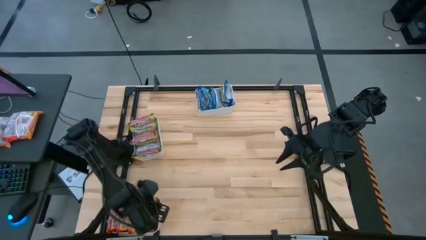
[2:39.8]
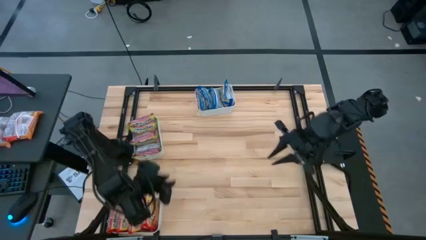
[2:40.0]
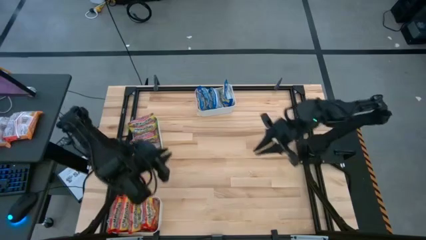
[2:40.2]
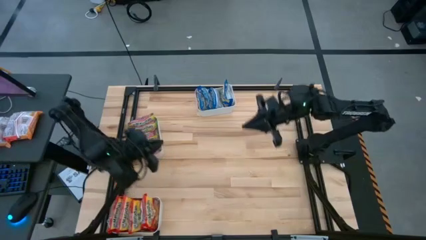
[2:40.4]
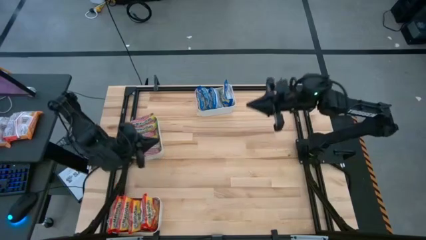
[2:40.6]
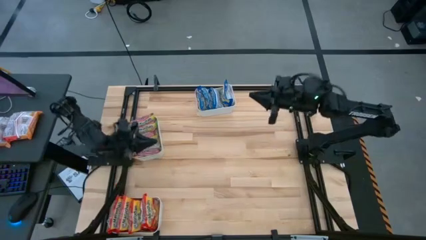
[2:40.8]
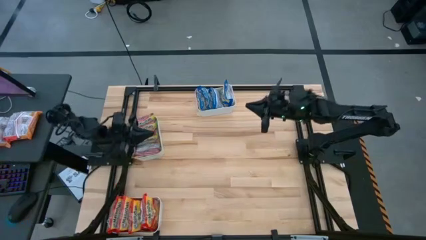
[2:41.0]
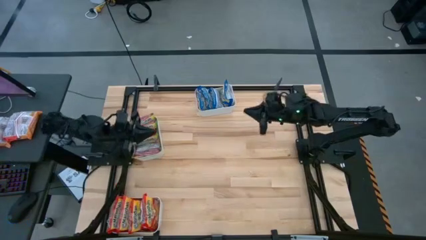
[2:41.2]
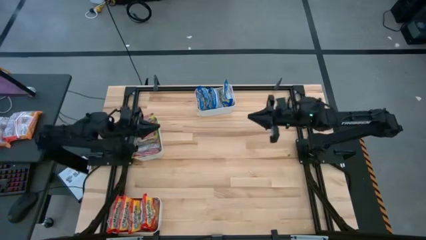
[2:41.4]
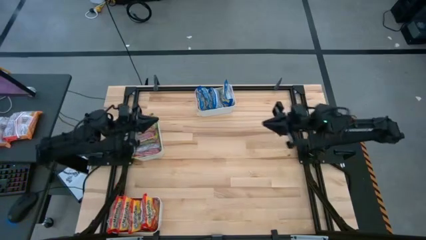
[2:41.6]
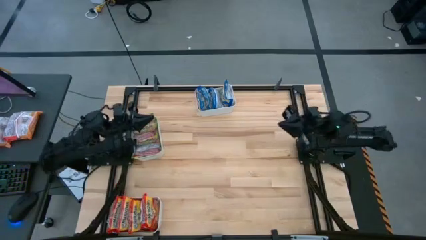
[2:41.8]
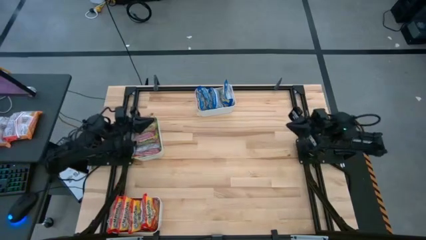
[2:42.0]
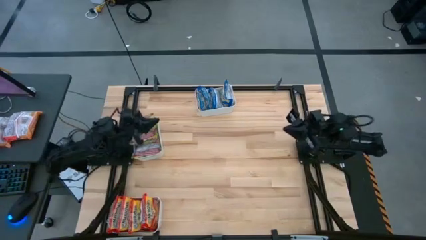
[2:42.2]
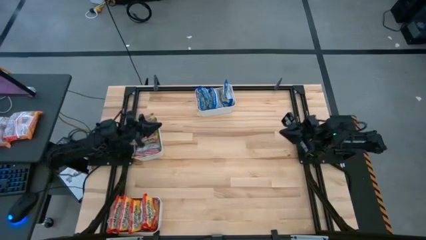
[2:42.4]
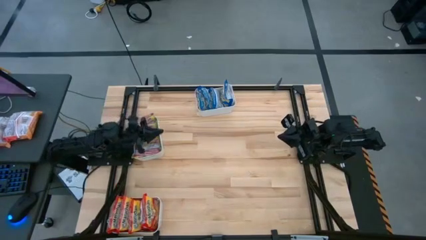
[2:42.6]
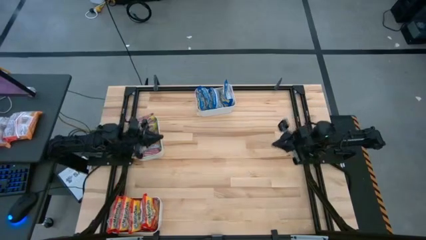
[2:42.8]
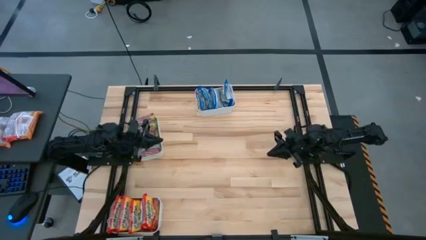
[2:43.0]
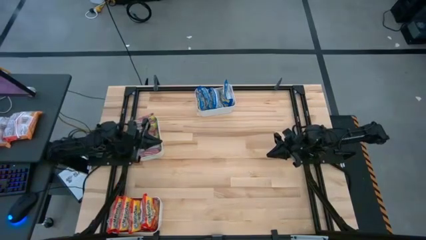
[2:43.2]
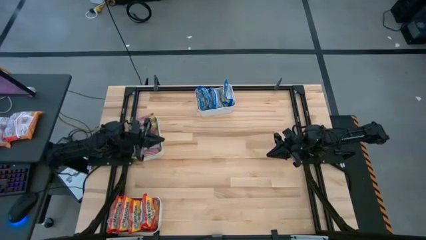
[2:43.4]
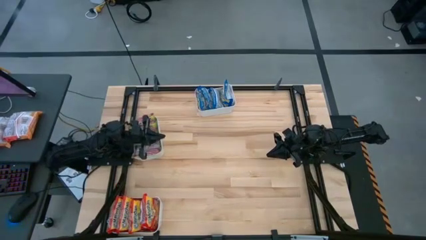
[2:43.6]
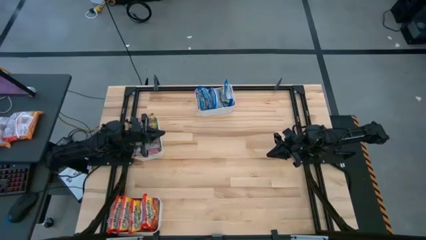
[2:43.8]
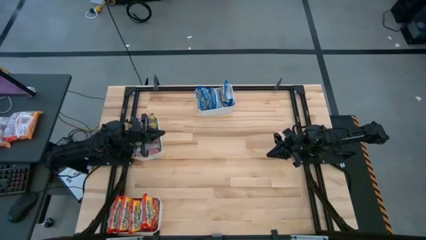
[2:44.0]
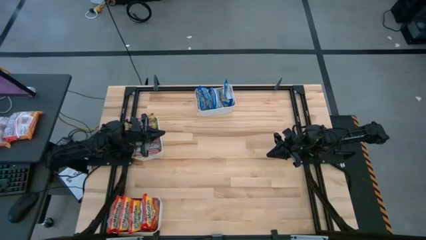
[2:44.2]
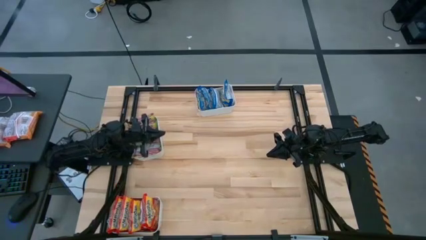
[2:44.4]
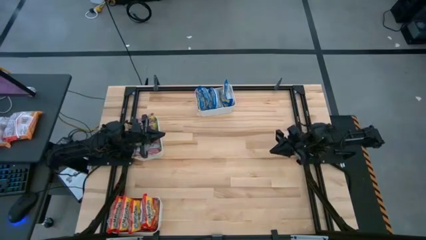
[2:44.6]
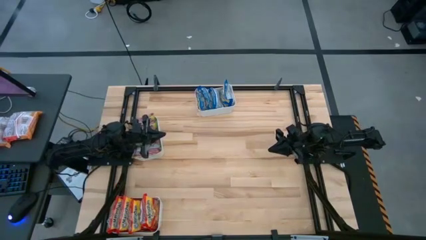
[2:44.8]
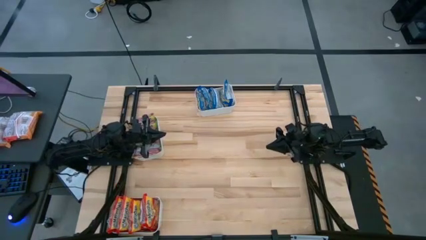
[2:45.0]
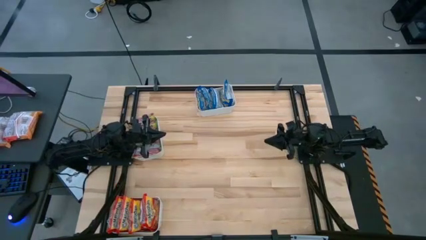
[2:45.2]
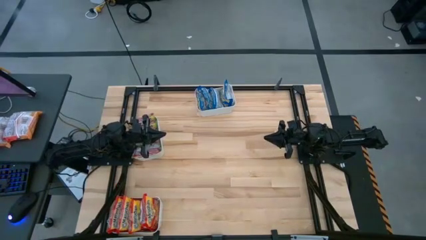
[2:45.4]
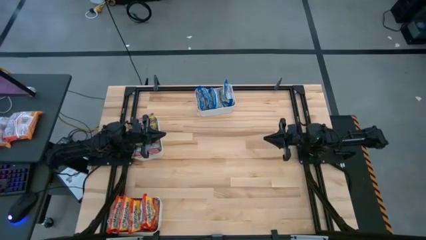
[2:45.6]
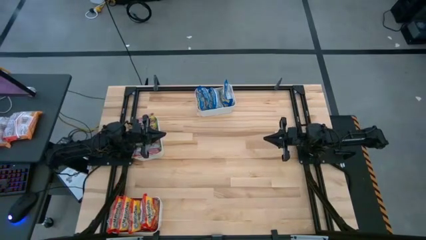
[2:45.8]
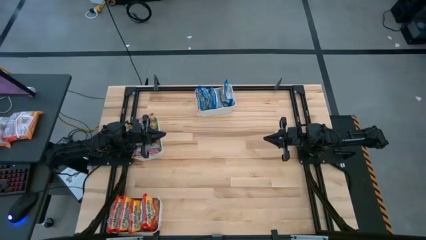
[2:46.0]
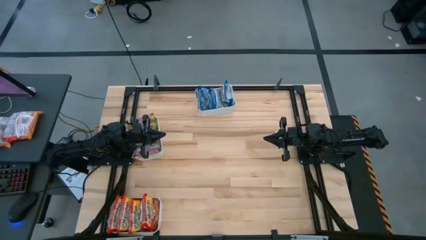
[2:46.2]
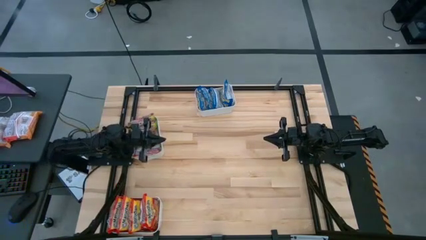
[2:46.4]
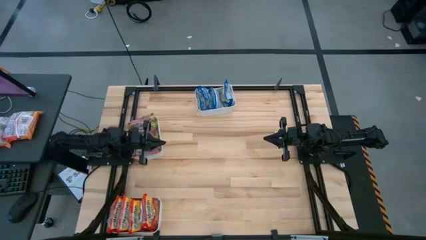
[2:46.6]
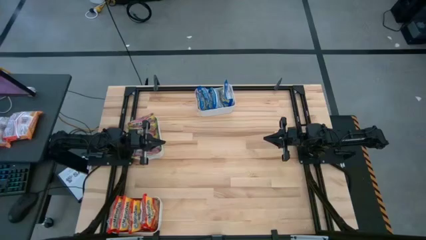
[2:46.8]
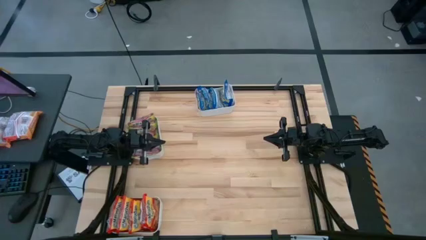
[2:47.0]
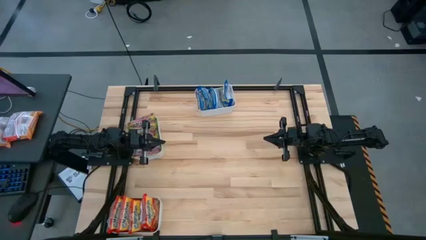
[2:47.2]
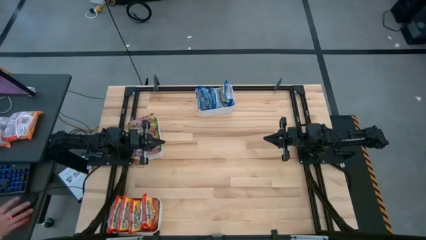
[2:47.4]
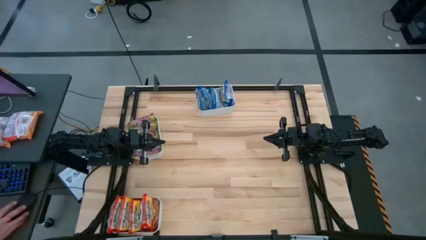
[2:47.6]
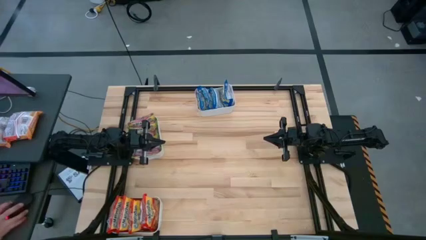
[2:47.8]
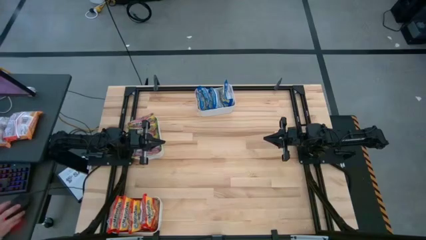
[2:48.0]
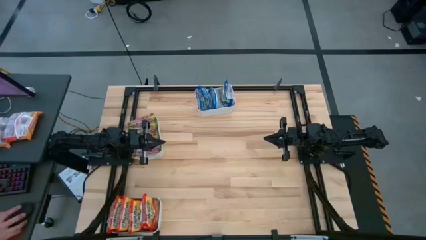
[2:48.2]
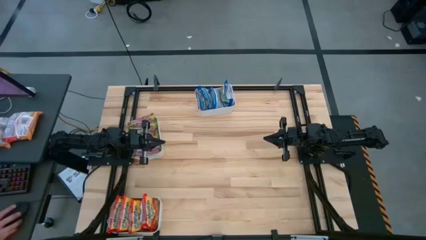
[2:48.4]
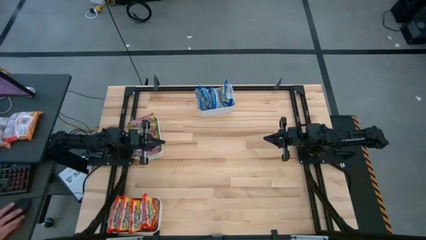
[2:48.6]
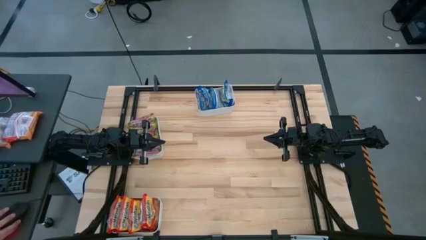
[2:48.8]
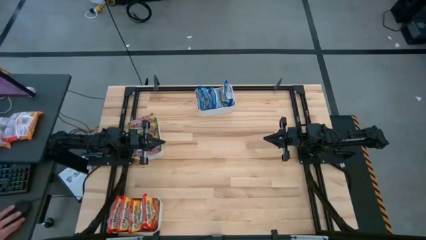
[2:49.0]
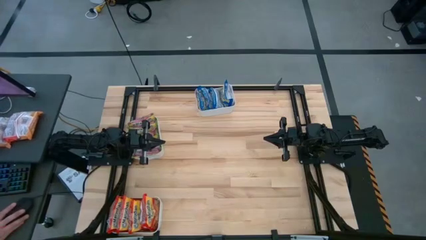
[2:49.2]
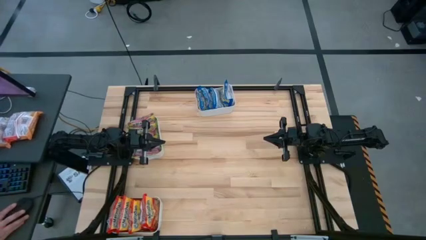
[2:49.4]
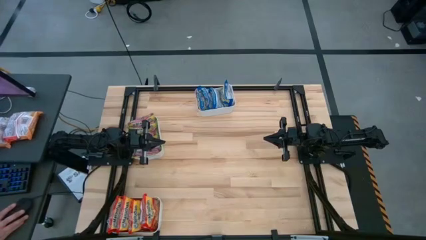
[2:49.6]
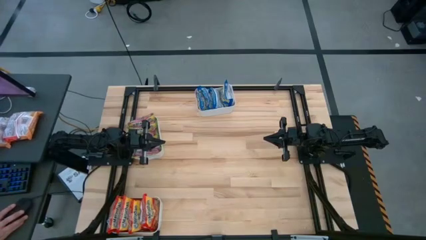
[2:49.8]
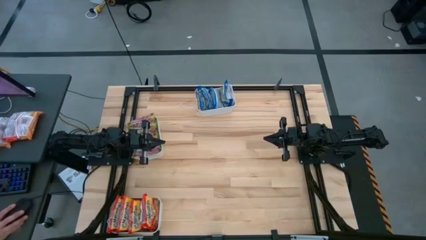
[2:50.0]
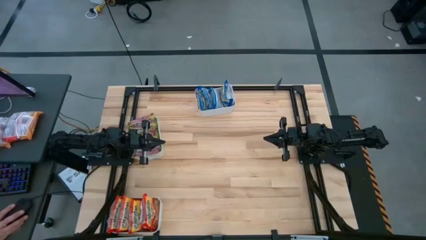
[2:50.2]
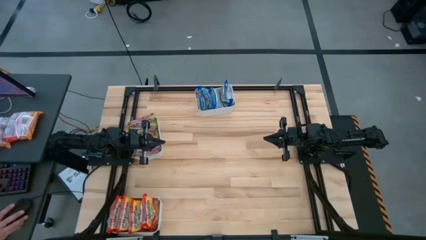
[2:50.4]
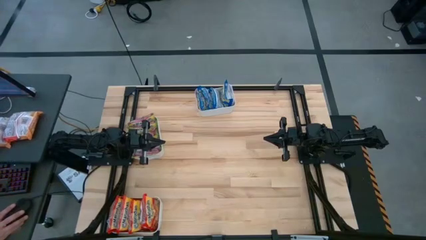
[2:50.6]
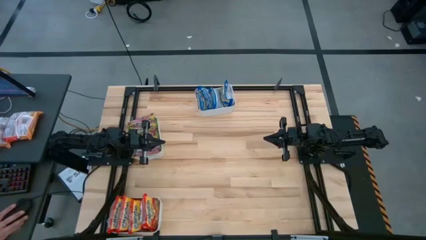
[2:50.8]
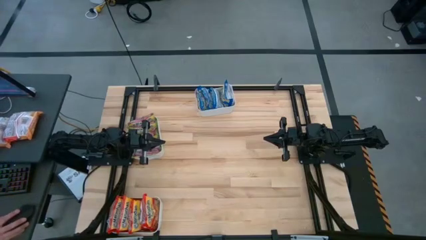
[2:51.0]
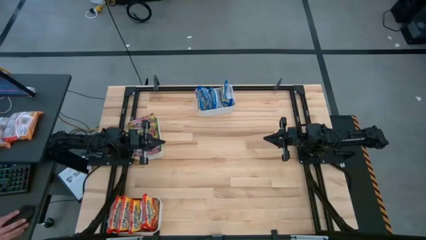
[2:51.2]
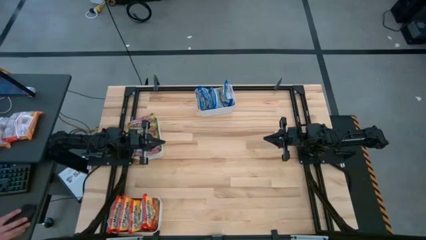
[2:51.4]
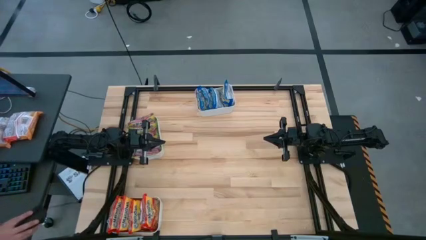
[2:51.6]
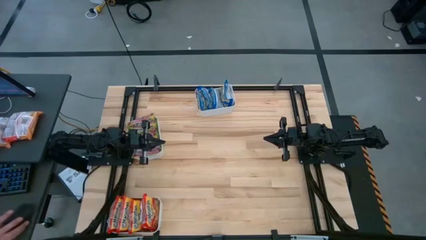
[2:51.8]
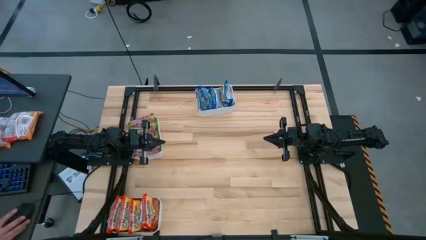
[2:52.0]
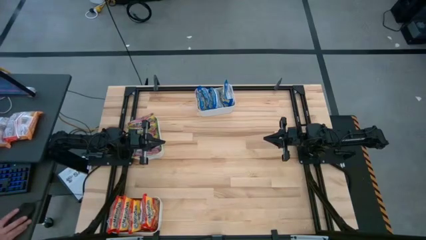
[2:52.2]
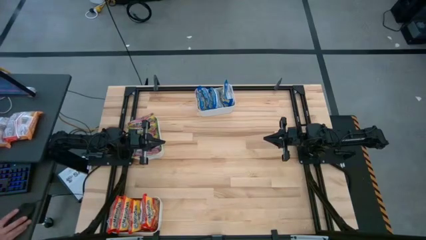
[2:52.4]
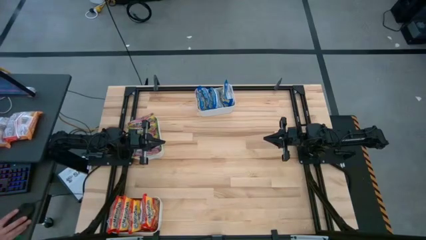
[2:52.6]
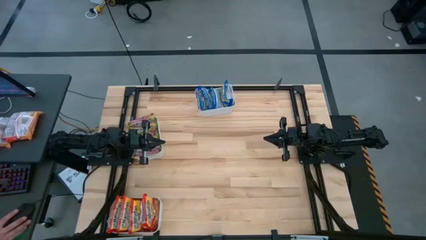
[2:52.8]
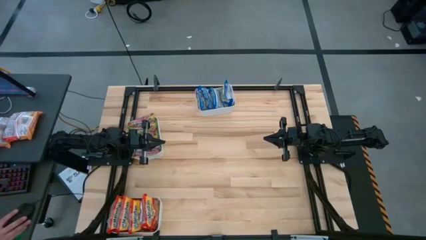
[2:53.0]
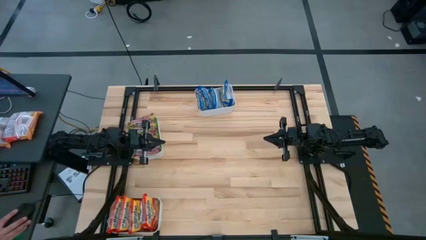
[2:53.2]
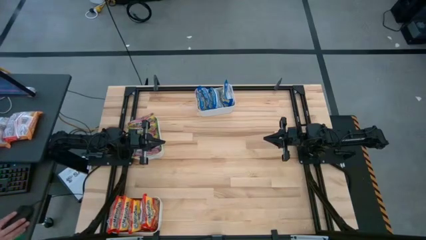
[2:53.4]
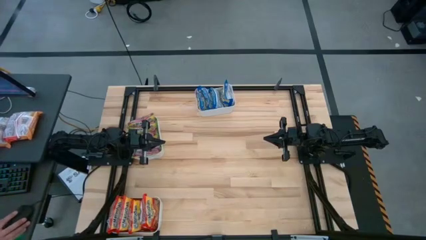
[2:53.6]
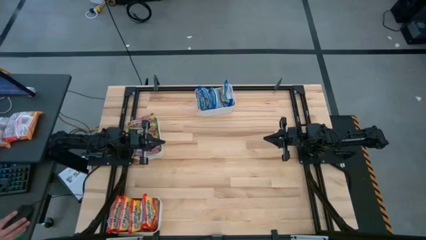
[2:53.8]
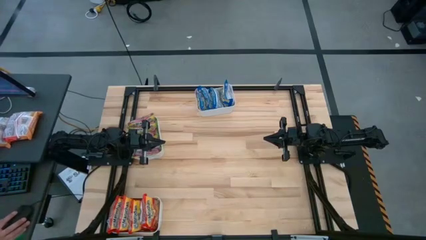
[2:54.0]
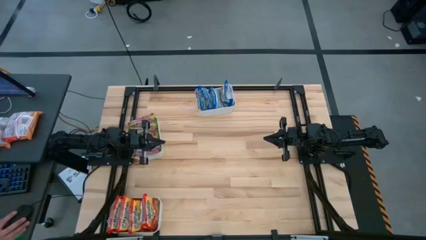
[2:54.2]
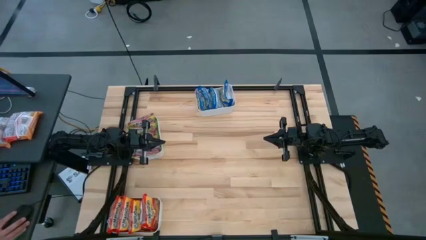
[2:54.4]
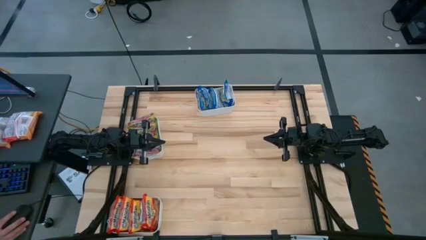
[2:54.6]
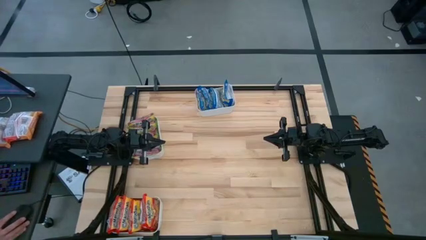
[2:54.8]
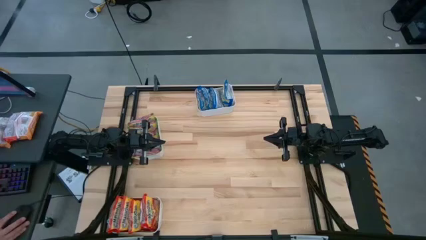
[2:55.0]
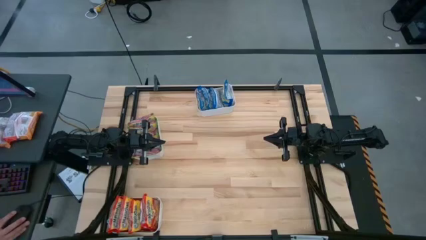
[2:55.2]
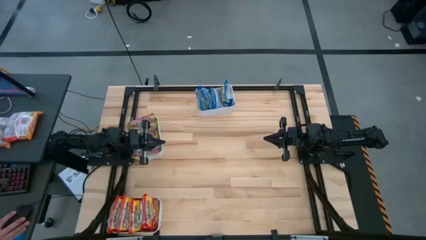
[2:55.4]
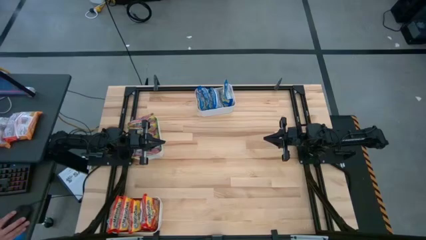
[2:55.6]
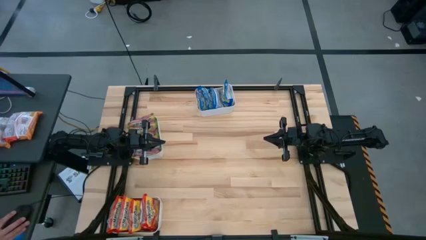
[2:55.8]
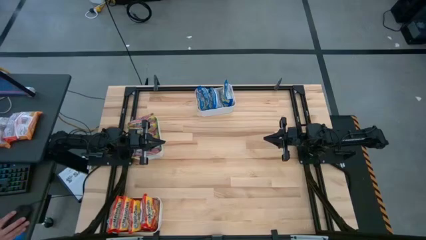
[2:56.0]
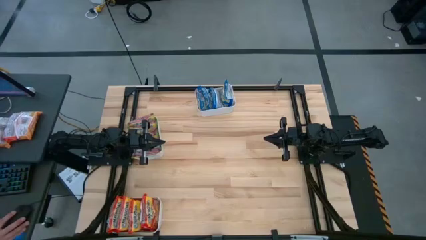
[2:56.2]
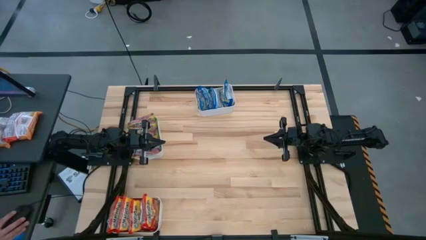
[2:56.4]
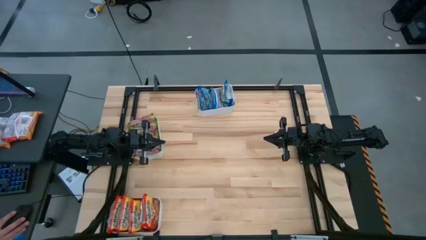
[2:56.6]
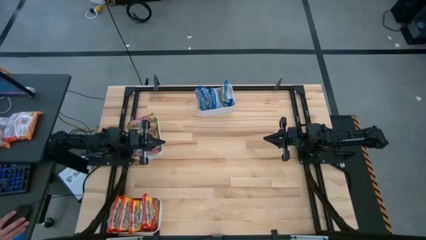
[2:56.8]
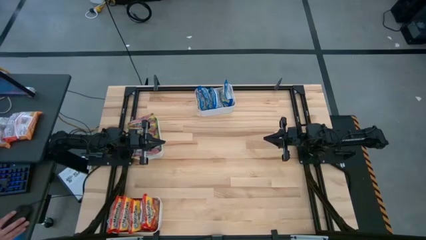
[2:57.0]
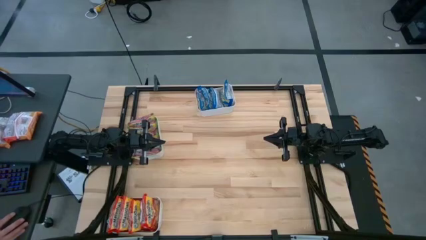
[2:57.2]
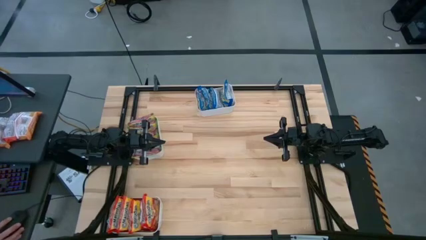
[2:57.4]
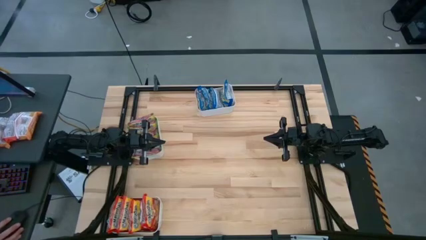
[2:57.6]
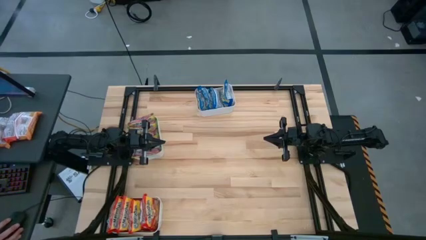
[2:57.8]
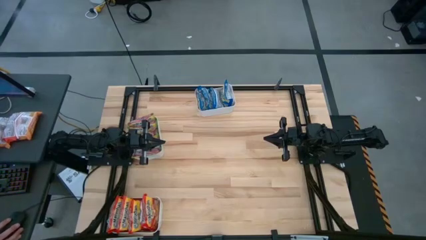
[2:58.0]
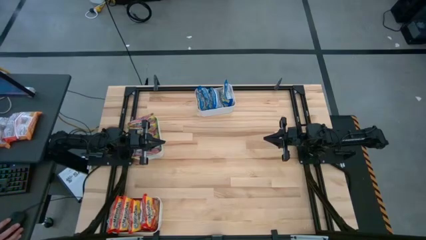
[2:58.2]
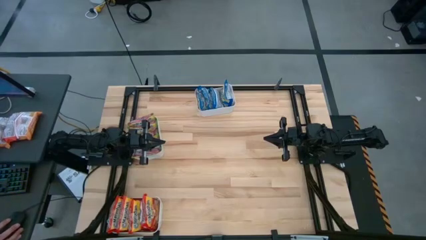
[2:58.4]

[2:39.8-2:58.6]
Task: Sort Maruchan noodles
Return to Home Position
